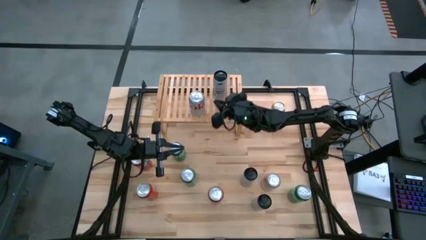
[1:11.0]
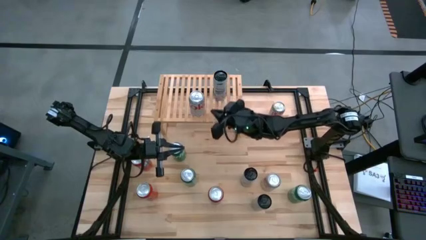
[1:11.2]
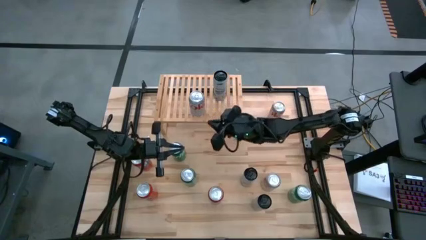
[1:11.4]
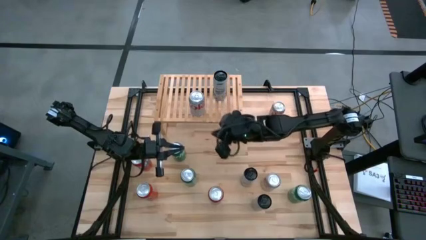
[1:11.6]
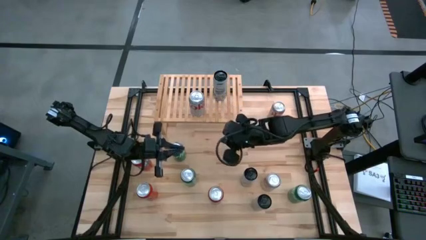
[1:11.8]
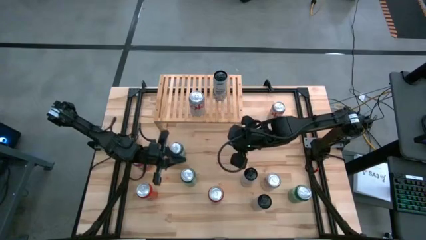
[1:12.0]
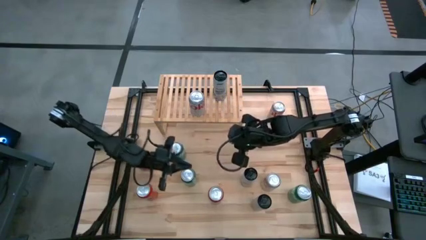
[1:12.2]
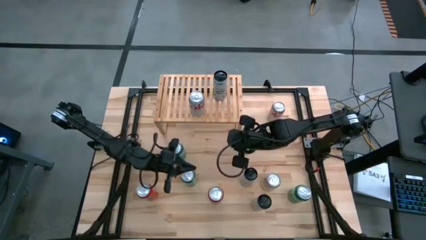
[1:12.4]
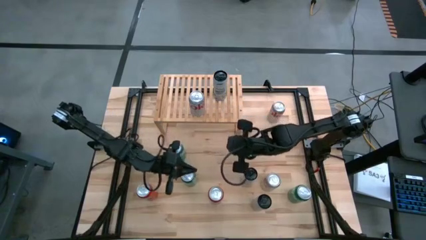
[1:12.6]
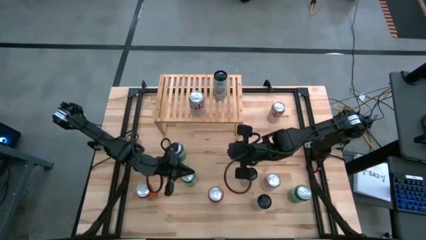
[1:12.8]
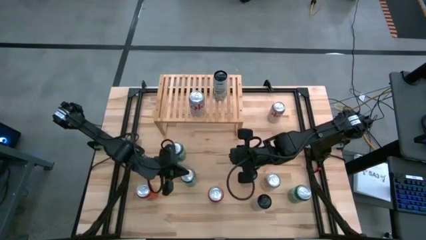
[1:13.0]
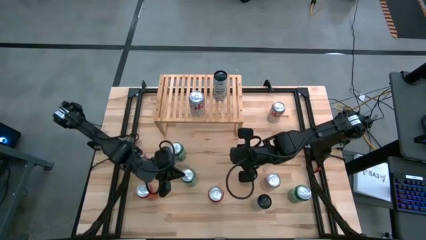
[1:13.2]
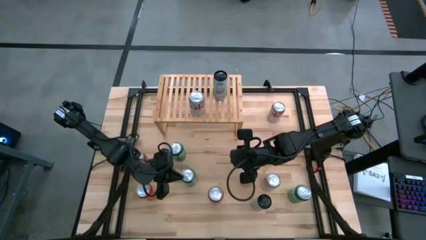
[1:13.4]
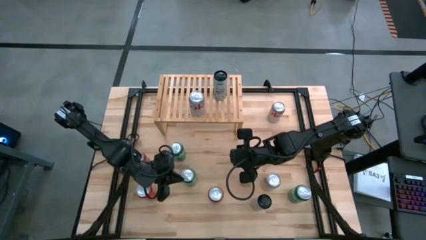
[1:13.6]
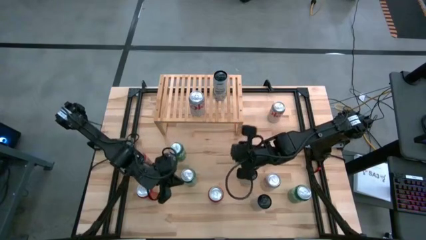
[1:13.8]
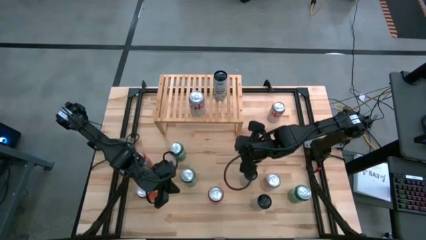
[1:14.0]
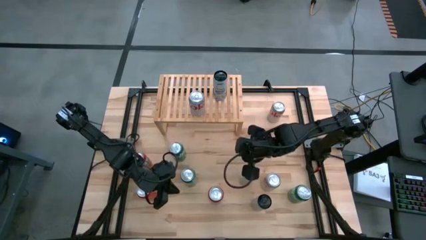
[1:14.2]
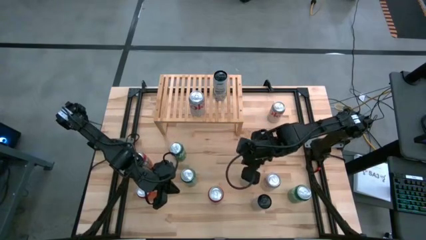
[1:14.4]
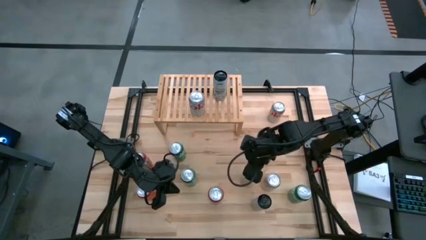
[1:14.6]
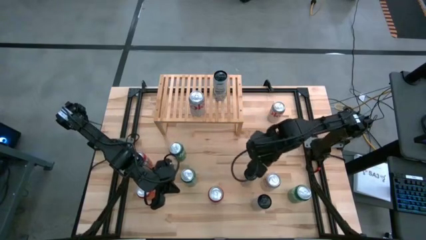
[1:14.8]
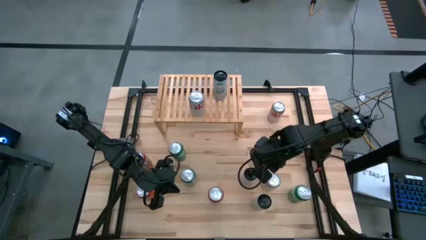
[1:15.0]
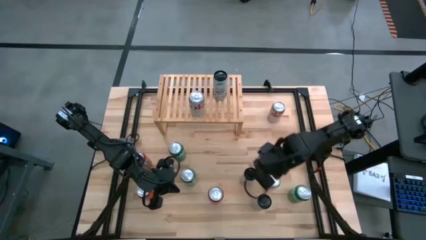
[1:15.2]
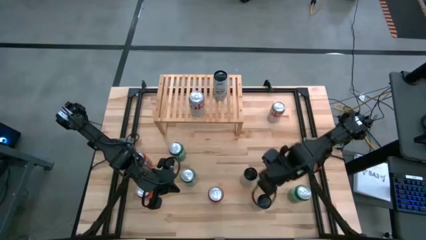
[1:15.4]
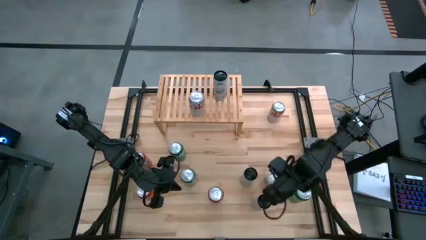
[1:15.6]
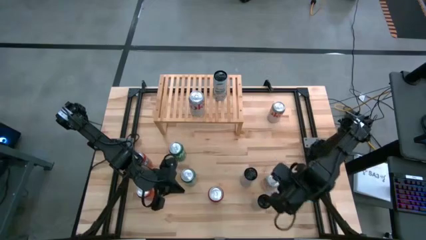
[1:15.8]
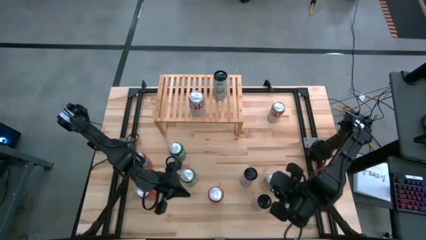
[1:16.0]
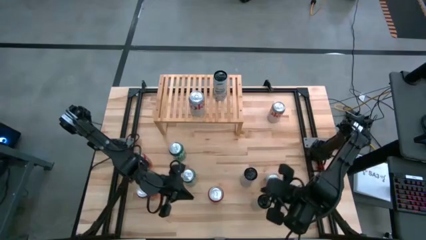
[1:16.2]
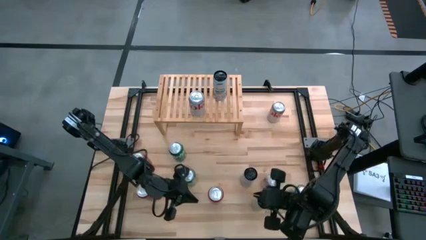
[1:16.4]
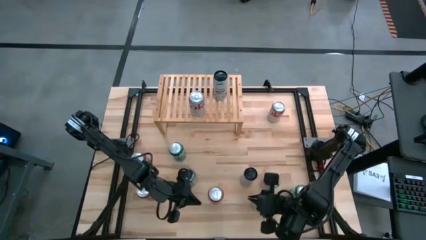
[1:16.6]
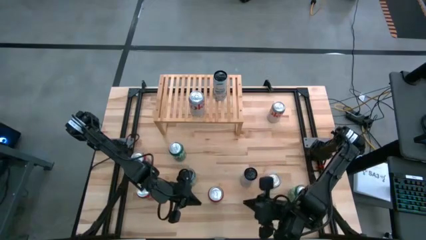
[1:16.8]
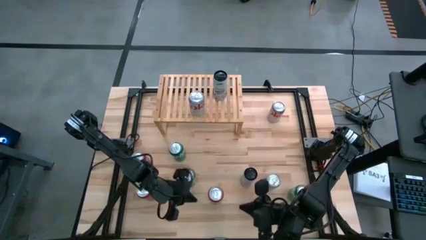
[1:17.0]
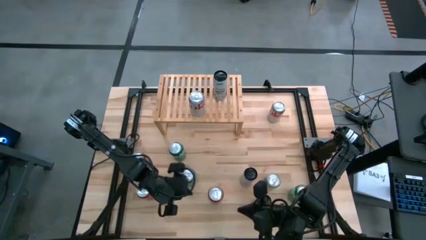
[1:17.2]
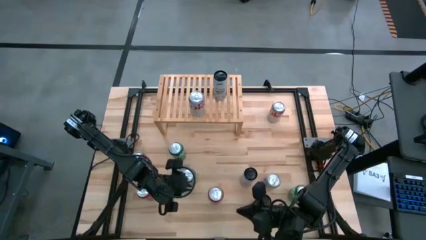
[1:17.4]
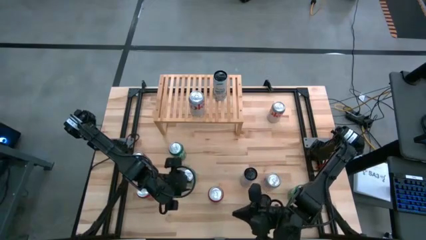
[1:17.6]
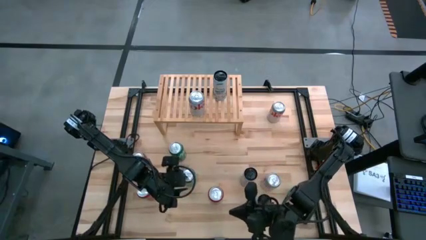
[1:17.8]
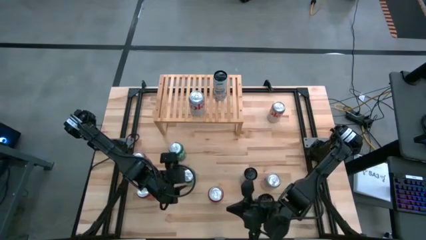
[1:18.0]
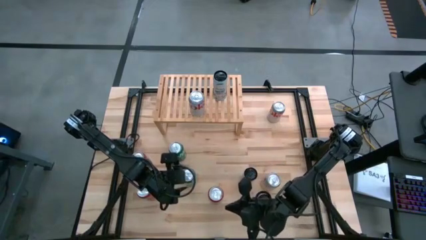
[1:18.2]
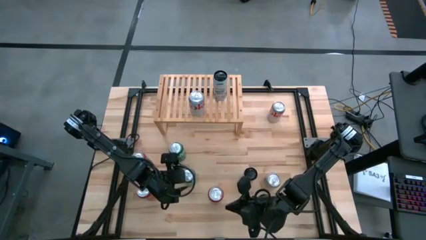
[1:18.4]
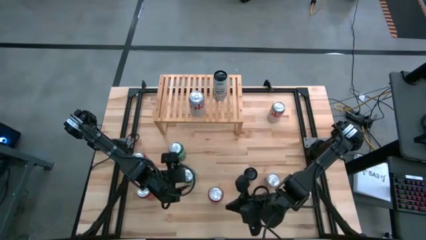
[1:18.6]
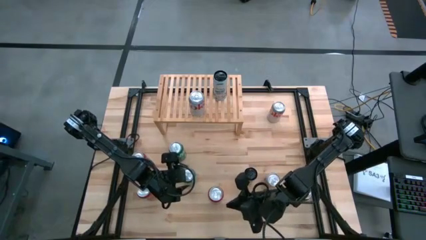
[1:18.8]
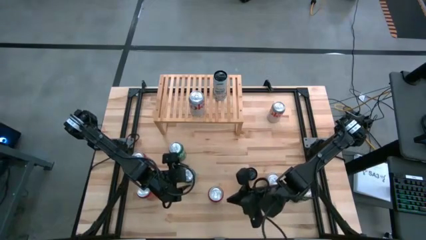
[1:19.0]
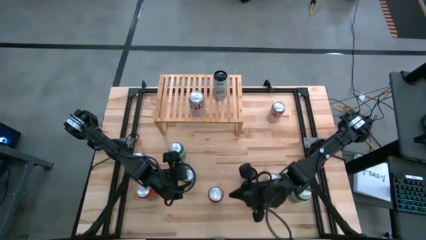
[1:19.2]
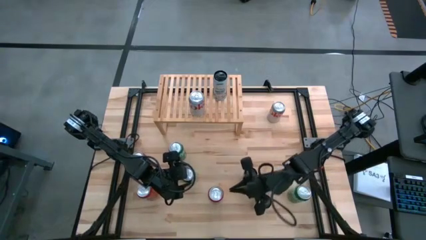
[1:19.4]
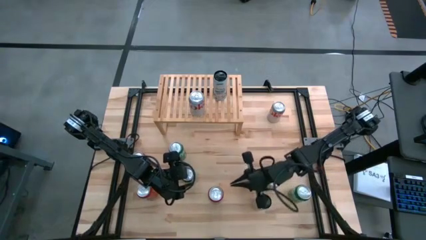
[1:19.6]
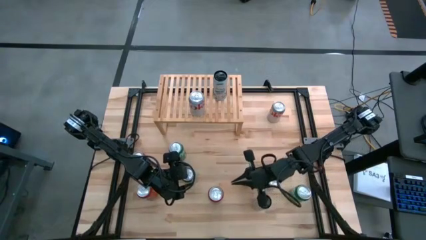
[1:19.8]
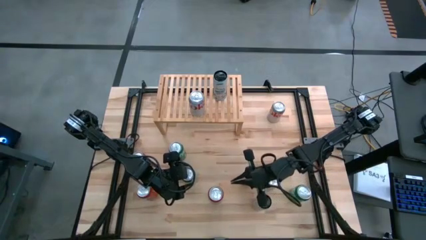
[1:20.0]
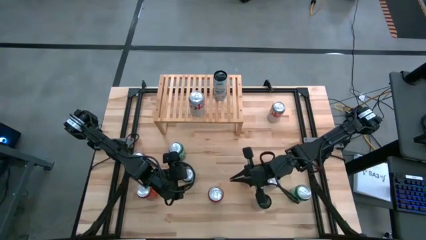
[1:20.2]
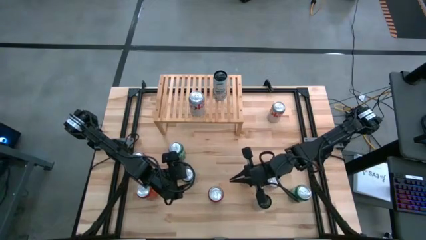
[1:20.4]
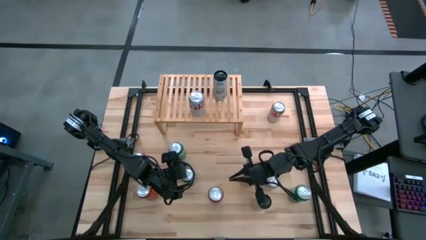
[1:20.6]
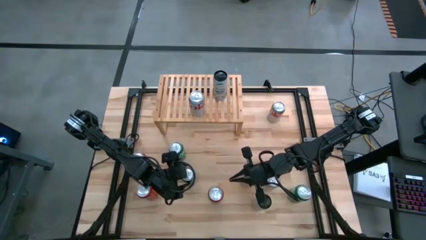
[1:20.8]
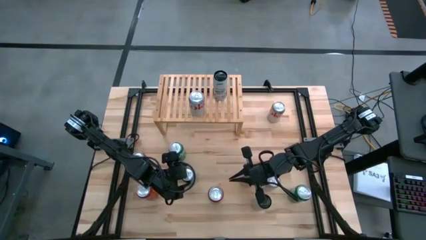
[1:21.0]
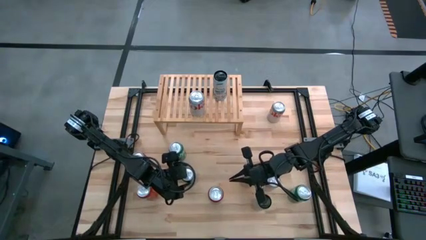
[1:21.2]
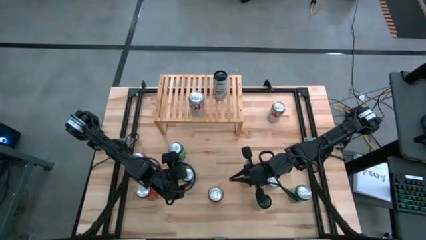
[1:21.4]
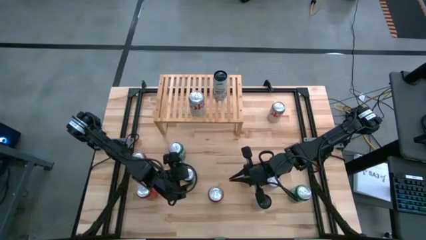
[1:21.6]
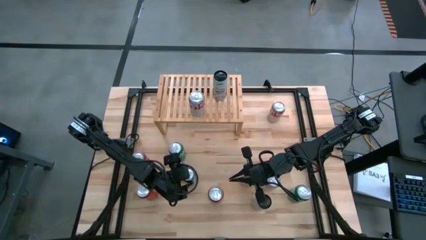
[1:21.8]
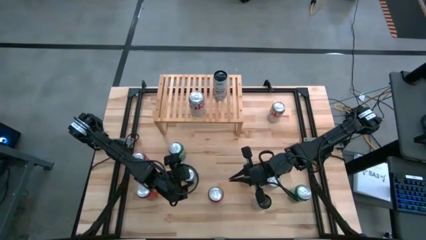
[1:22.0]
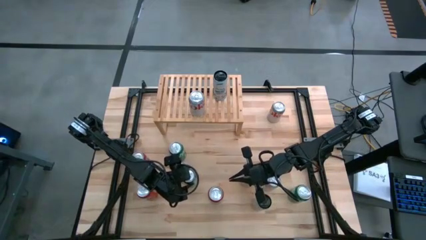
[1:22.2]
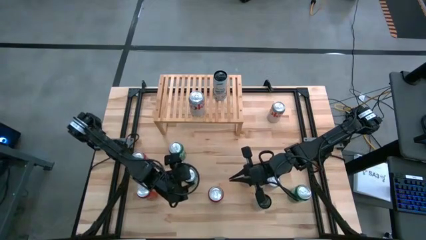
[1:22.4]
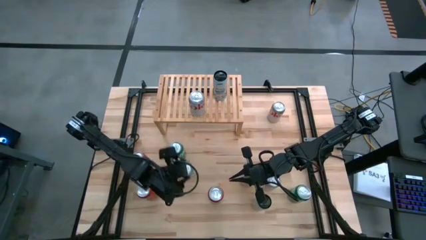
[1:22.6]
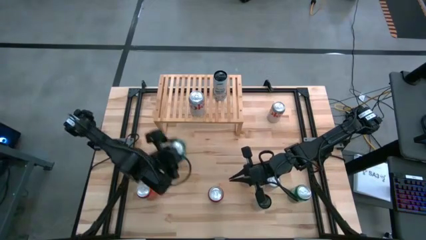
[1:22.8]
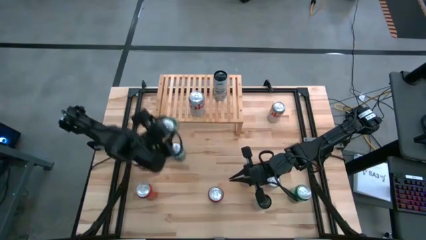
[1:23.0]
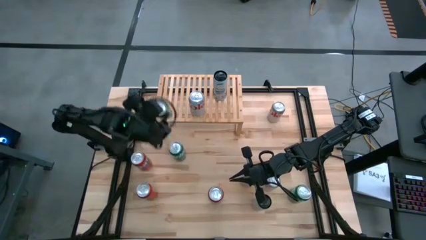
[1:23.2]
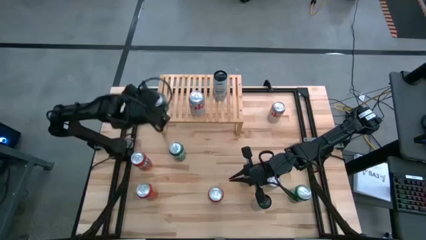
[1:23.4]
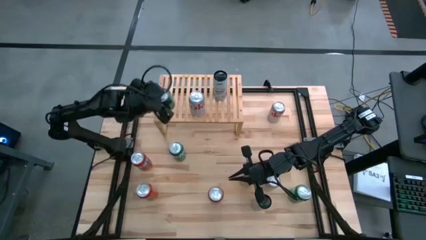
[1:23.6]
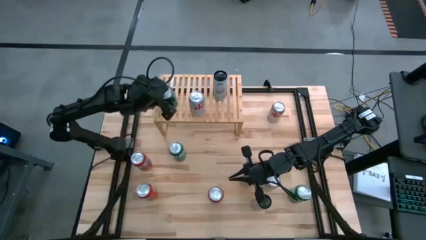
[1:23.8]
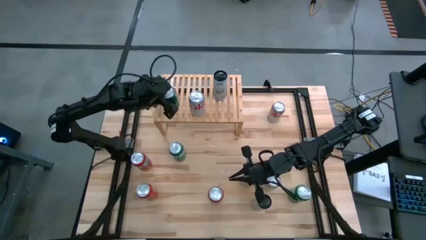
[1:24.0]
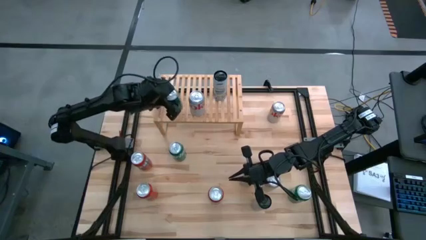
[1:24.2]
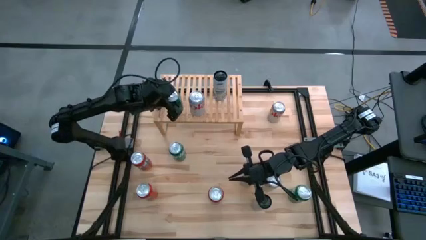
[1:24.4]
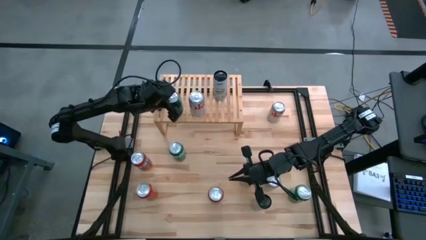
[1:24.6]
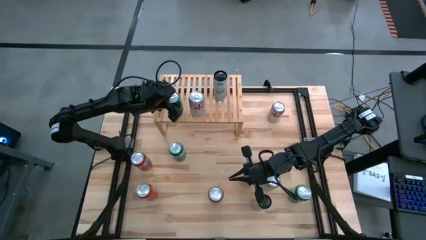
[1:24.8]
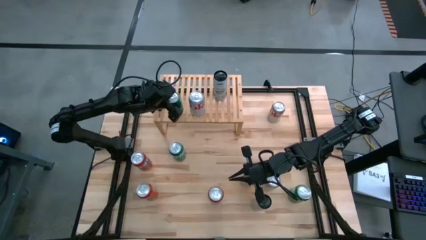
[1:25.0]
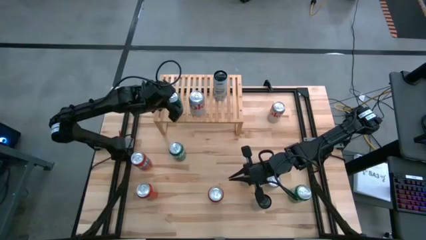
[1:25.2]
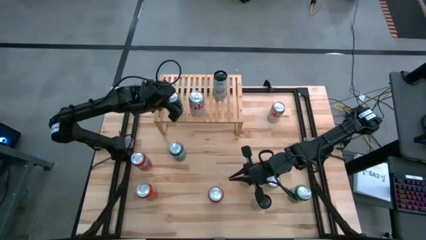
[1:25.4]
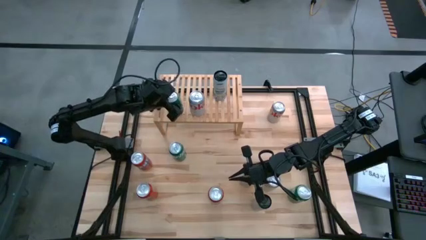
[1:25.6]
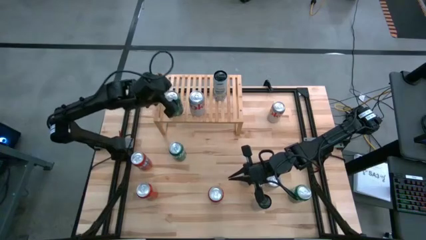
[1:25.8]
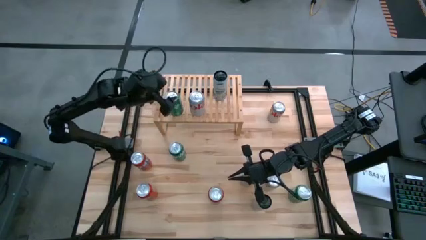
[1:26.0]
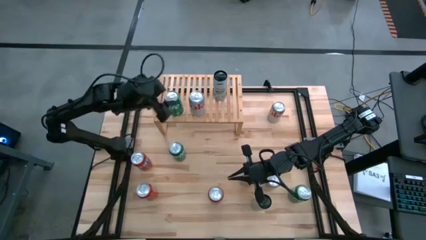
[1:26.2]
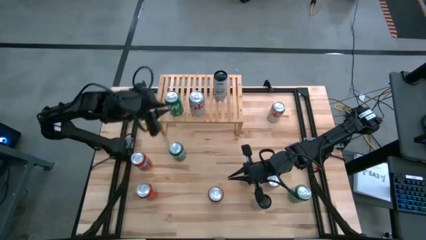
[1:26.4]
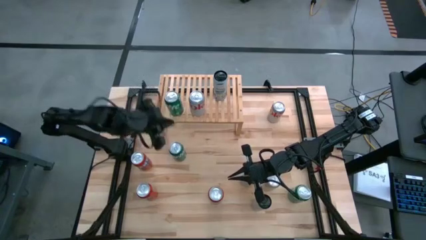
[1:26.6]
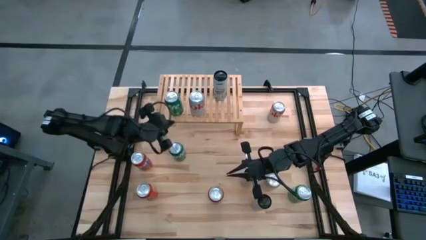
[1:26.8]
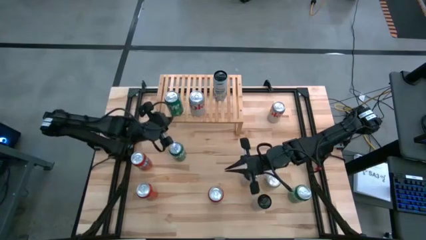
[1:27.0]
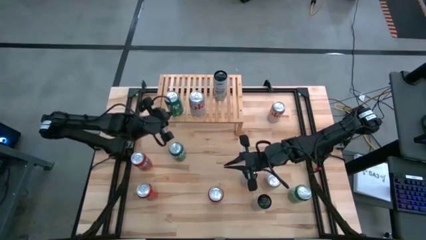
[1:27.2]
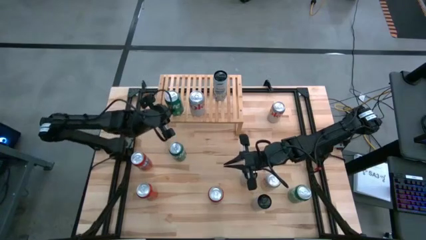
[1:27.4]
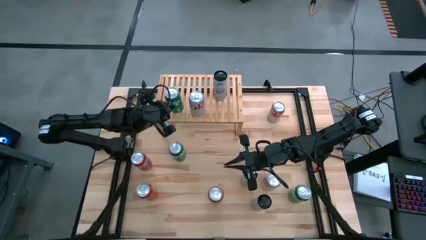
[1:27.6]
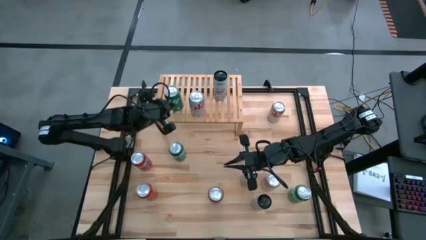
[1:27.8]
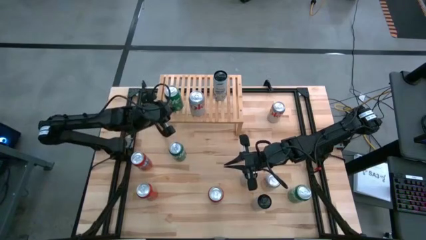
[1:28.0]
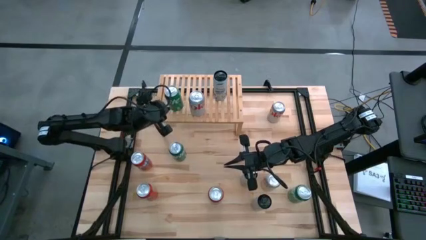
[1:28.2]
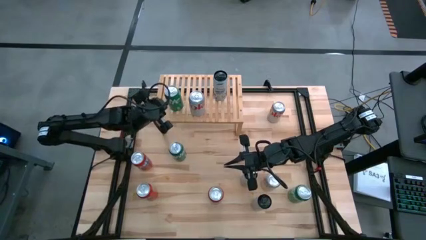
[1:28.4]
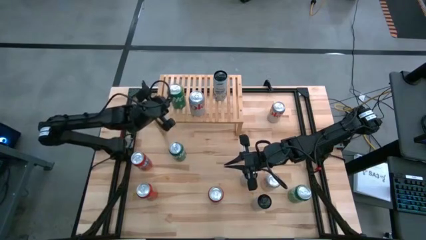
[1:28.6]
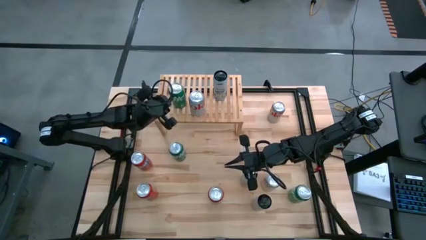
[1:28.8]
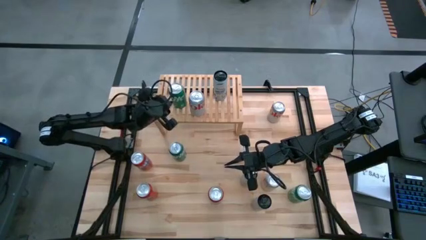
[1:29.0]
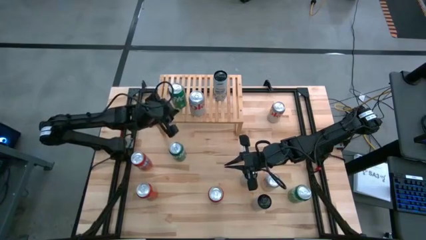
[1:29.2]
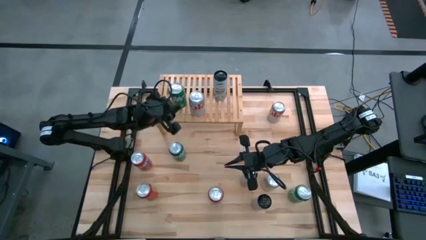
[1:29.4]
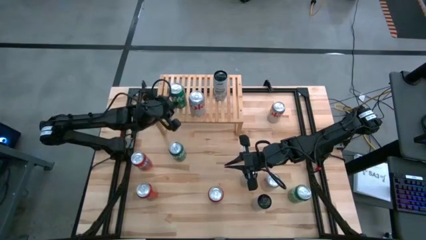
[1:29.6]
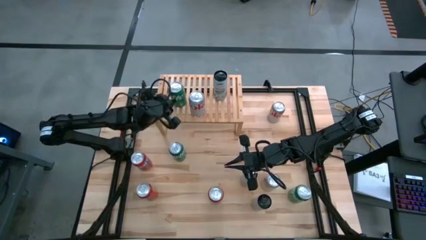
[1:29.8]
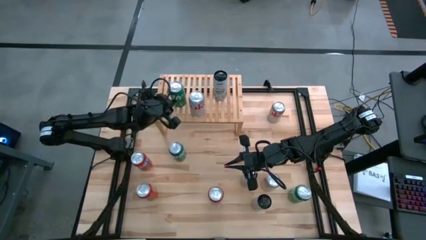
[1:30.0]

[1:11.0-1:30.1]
Task: Place canned beverage on shelf
Put the left green soda can on the shelf
